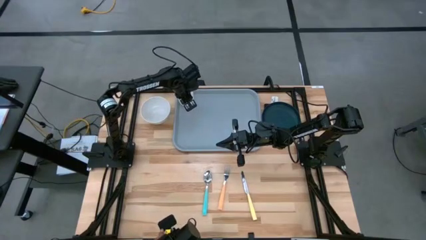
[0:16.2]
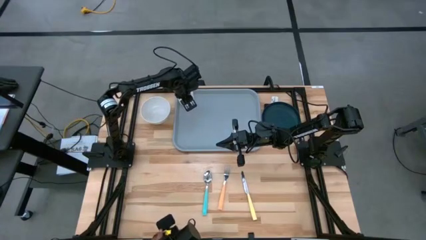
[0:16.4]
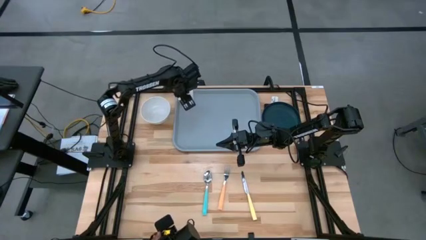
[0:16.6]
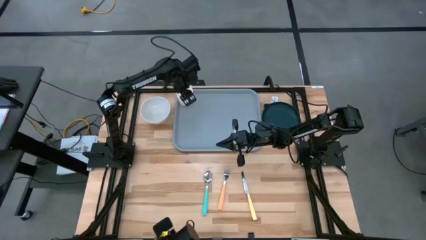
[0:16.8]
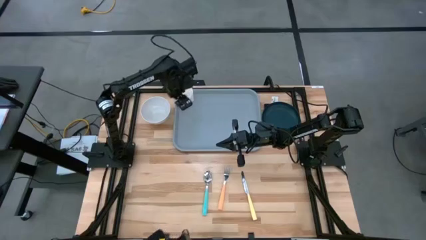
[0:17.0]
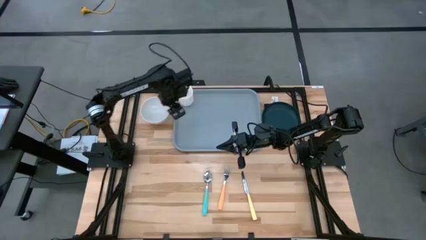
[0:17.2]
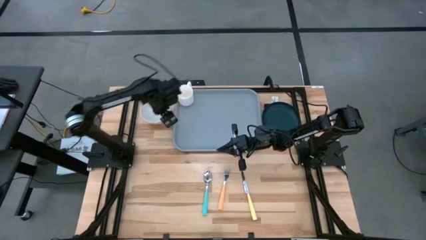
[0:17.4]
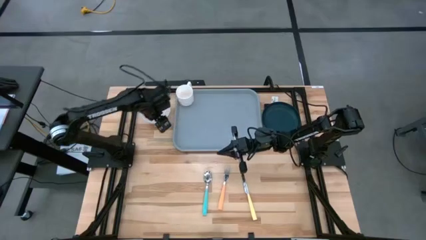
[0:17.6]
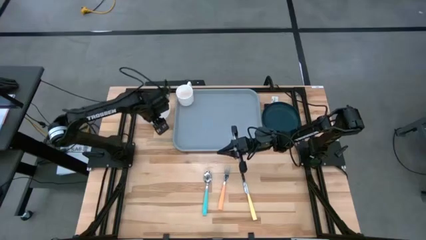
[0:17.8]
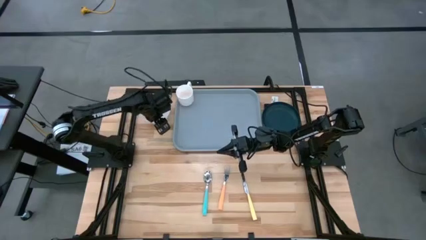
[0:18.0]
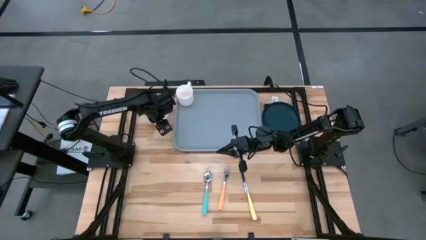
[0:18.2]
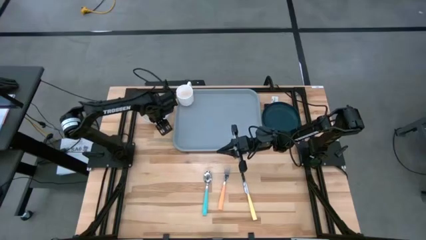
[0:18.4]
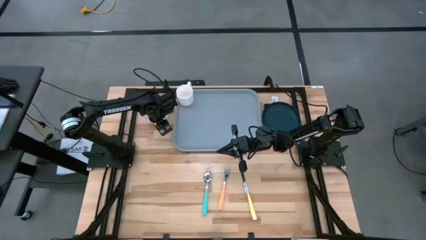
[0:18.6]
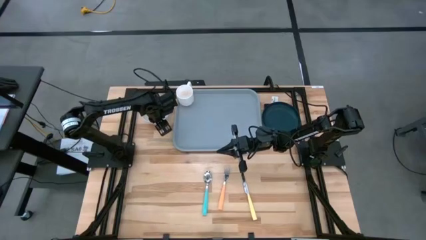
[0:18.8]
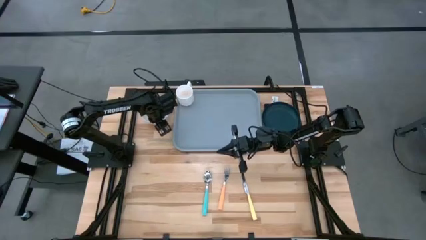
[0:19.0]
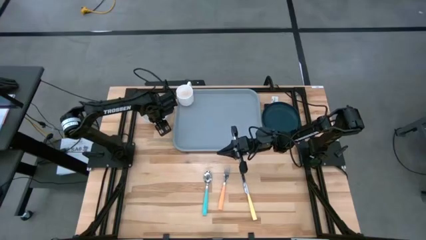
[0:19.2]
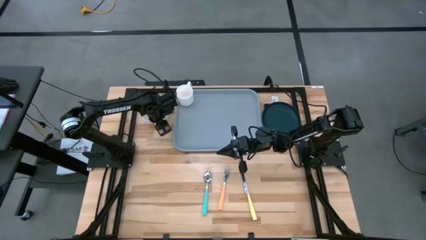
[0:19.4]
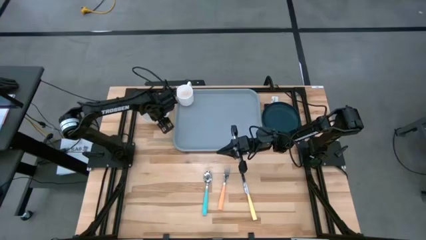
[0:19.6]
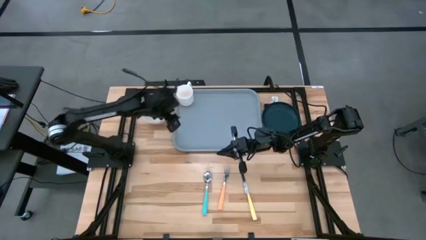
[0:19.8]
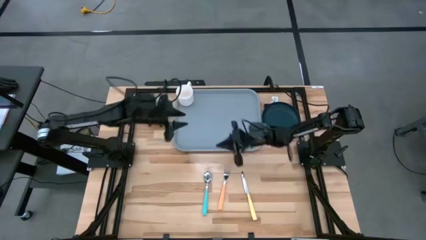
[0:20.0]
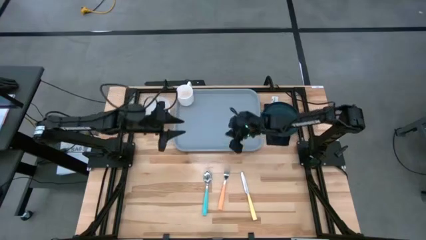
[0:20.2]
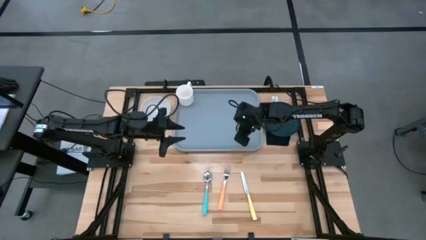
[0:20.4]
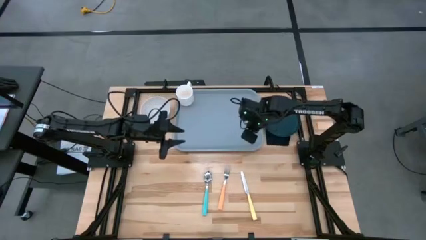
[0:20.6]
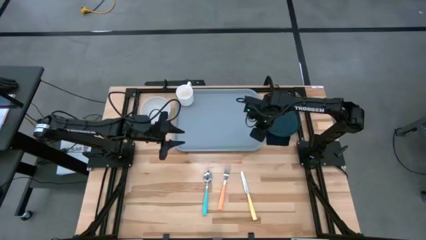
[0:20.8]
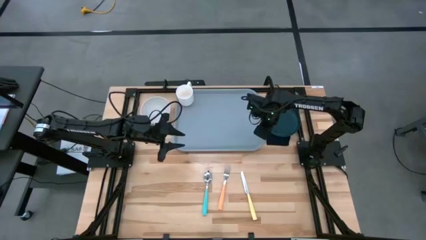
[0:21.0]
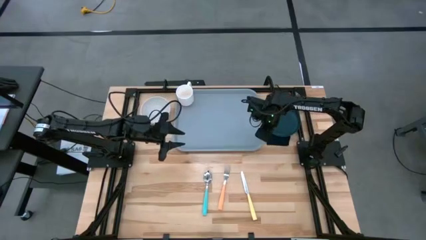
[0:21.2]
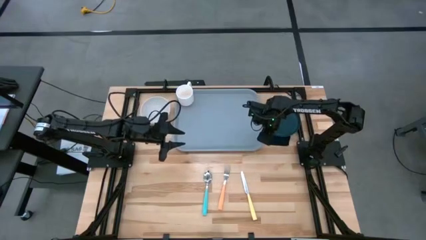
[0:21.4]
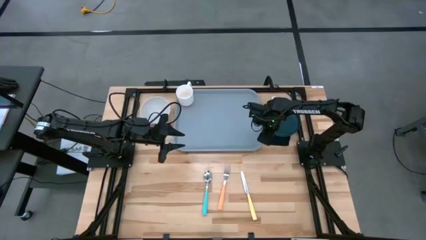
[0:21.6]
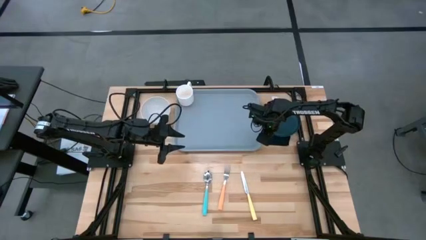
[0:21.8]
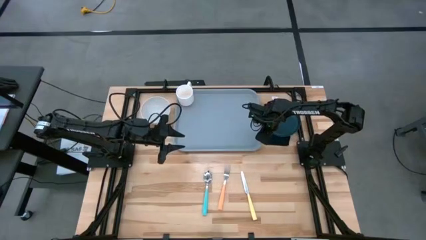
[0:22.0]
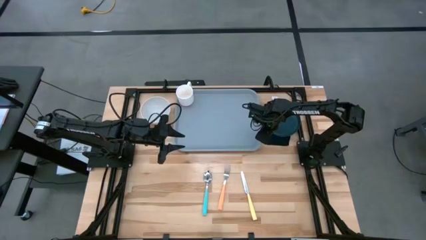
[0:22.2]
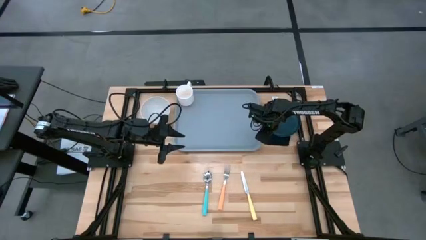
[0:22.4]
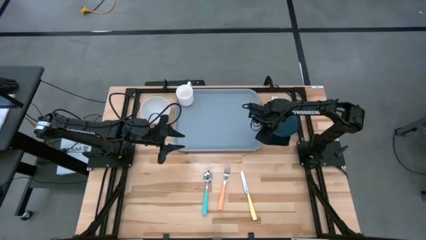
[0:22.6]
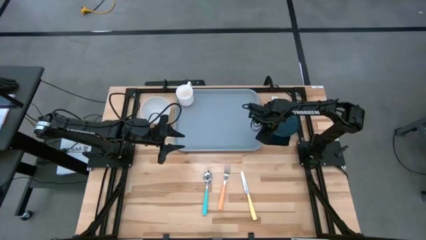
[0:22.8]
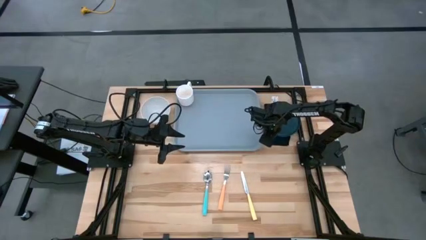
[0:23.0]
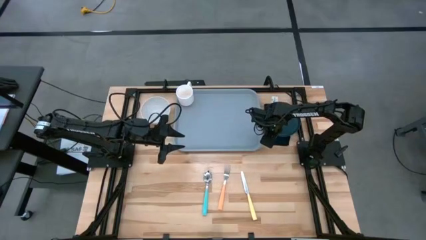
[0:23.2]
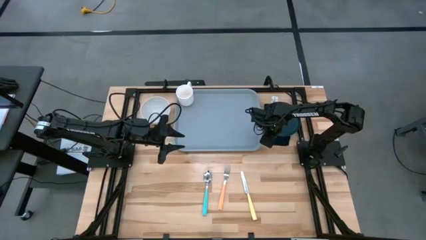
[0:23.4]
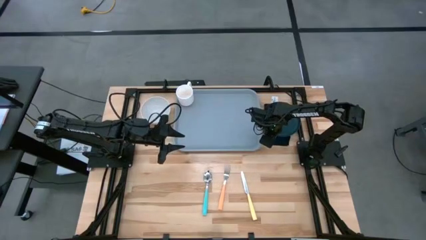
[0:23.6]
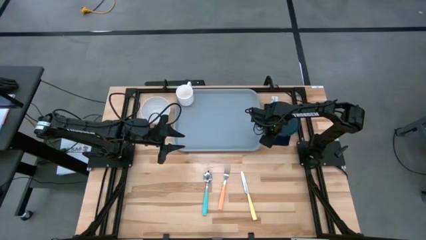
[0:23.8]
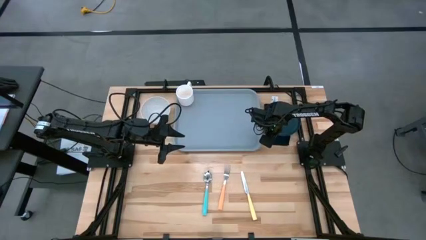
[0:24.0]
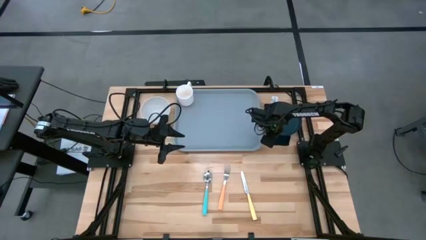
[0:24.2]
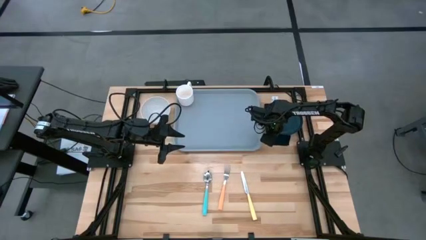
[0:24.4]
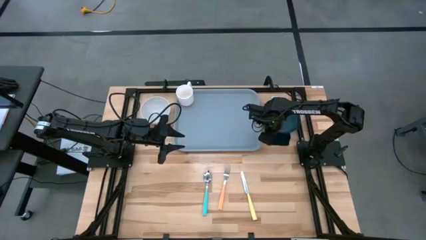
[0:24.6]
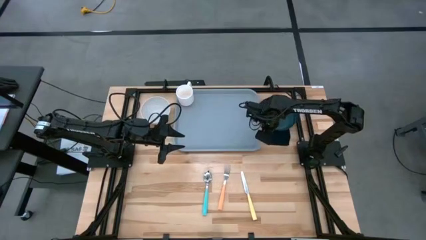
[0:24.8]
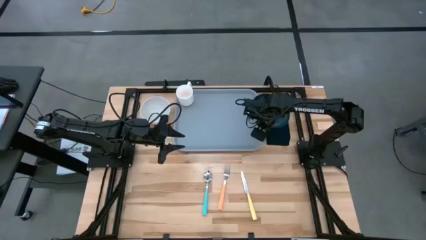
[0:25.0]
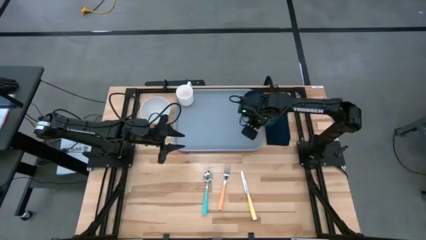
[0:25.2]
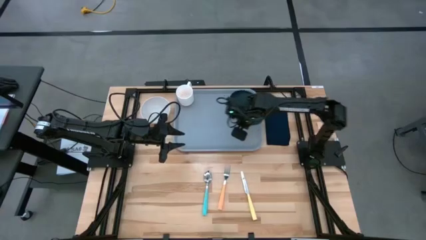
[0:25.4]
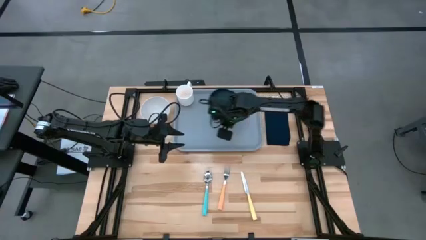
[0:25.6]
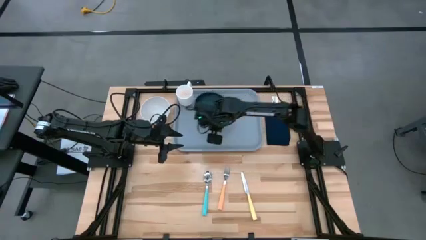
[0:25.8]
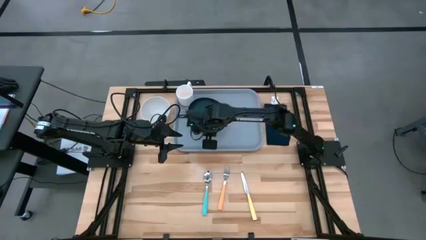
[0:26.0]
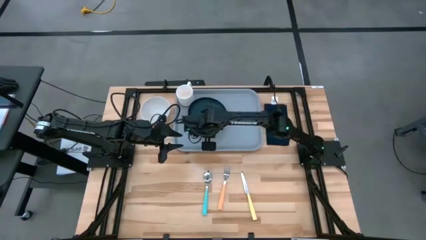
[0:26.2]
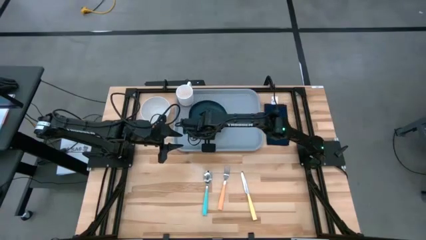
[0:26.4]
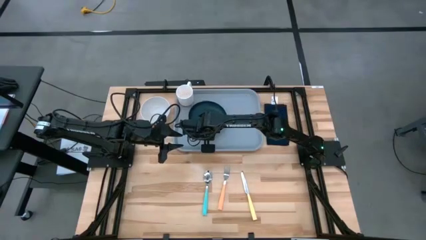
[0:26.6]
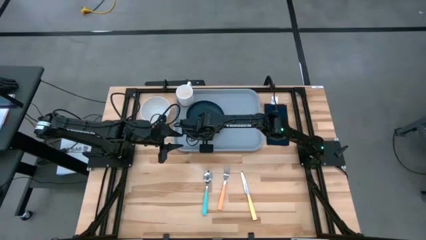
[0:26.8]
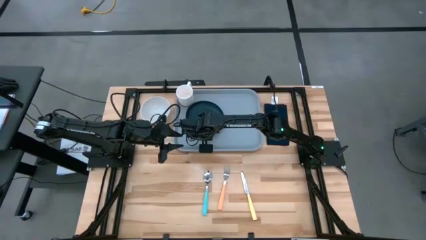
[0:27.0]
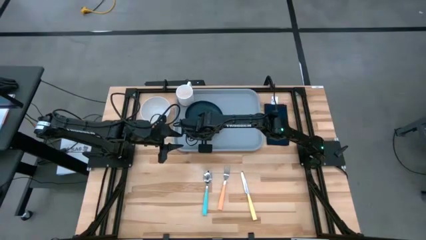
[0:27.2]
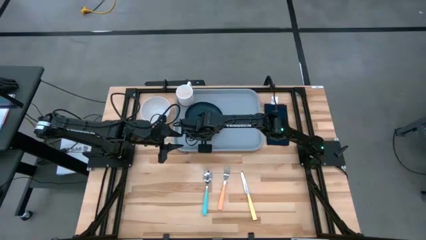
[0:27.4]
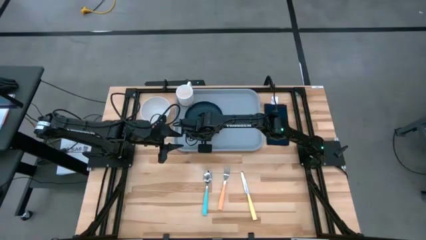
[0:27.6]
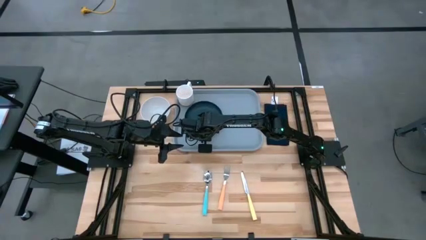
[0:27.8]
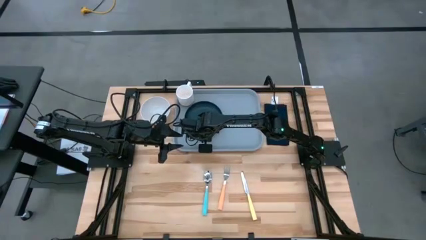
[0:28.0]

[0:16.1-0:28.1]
Task: Set up tray
Put the green plate on the gray serving tray to the bottom right of the white mug
